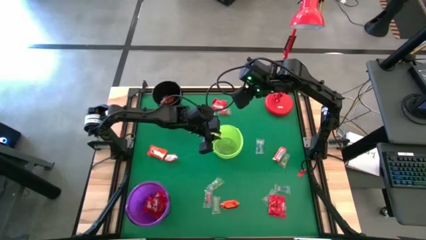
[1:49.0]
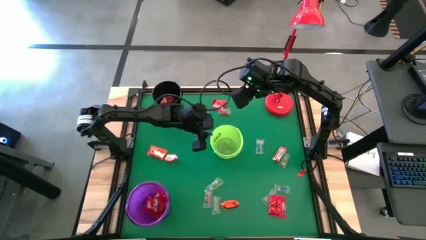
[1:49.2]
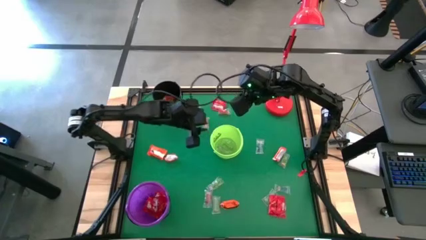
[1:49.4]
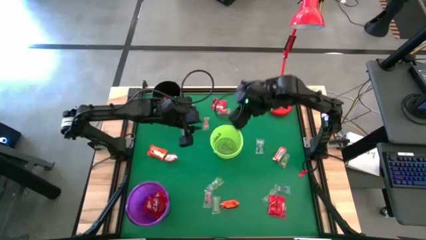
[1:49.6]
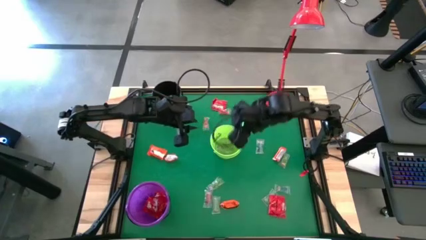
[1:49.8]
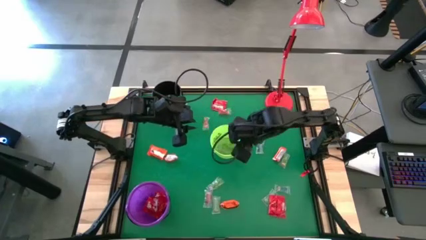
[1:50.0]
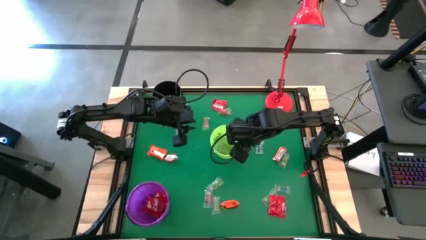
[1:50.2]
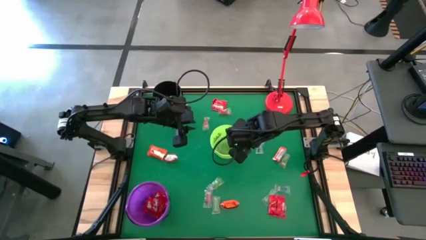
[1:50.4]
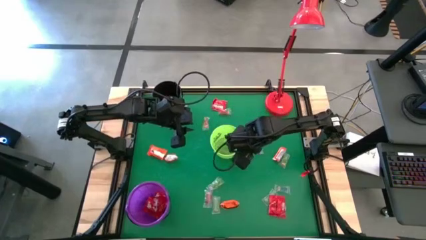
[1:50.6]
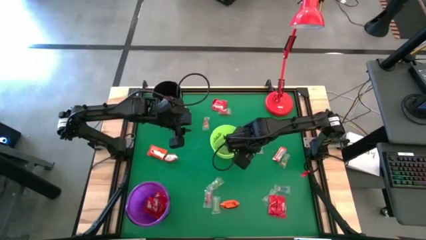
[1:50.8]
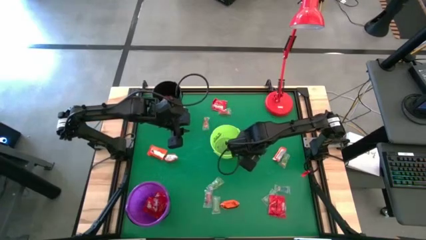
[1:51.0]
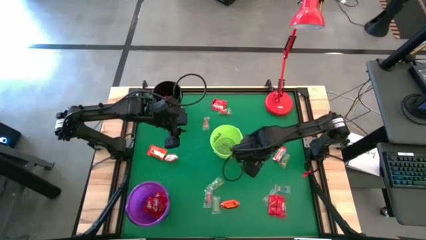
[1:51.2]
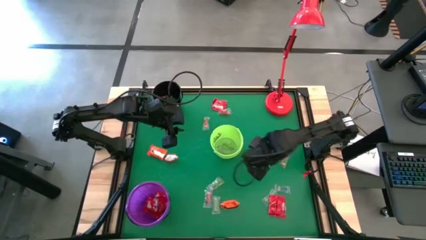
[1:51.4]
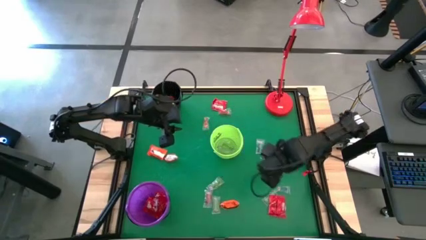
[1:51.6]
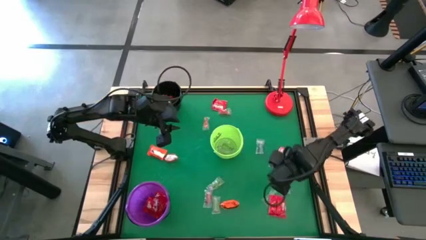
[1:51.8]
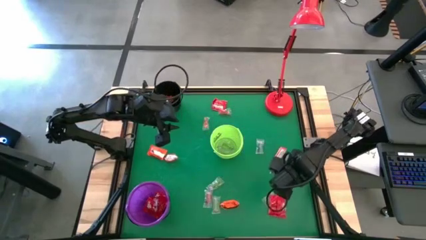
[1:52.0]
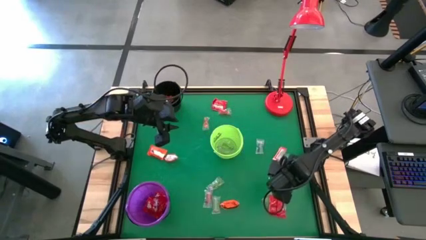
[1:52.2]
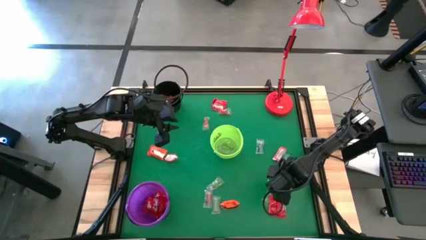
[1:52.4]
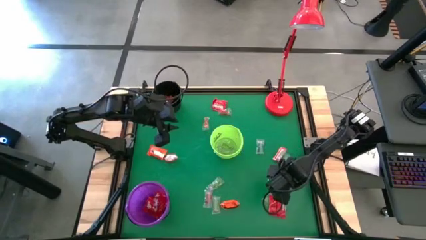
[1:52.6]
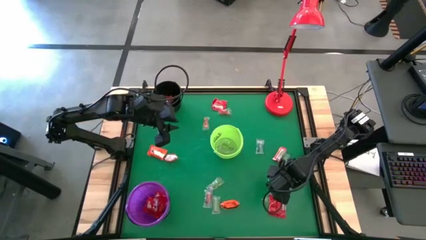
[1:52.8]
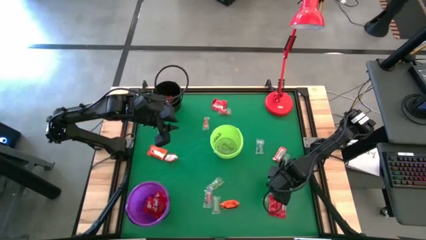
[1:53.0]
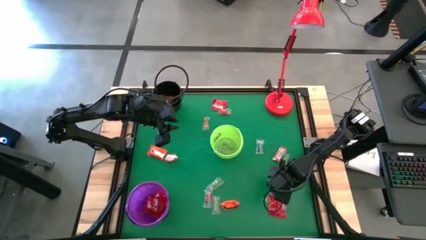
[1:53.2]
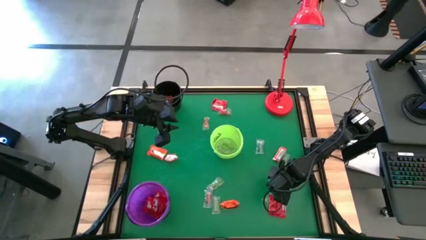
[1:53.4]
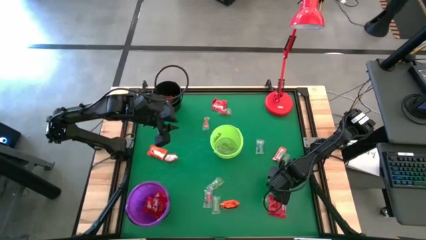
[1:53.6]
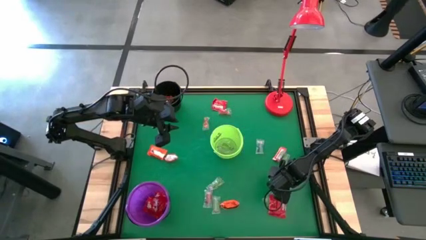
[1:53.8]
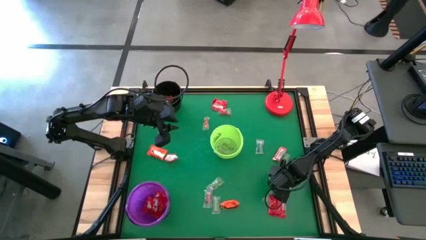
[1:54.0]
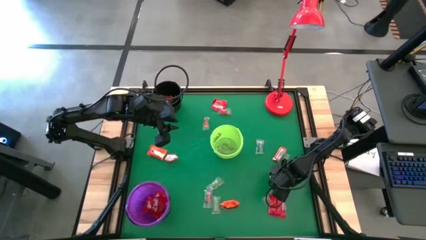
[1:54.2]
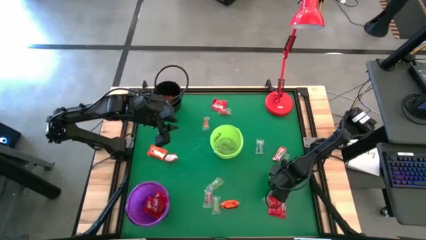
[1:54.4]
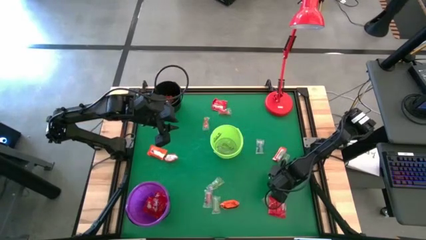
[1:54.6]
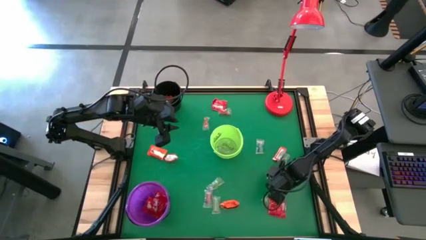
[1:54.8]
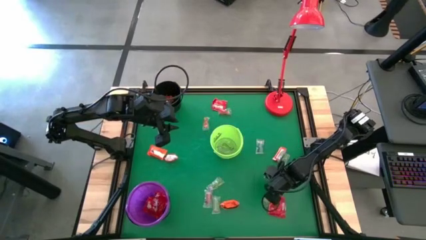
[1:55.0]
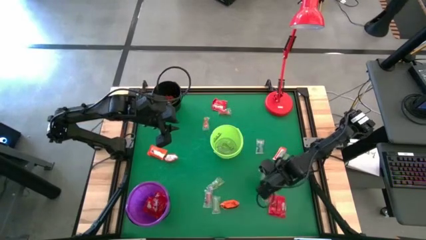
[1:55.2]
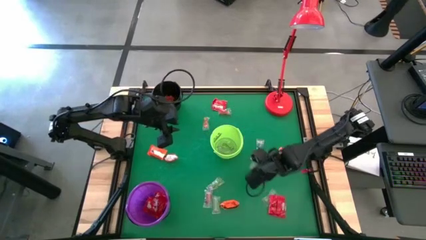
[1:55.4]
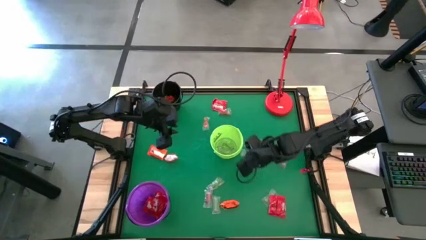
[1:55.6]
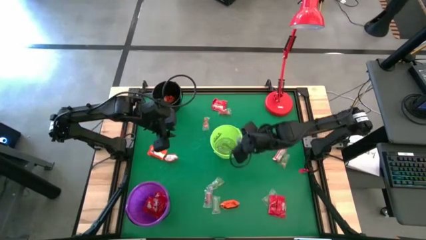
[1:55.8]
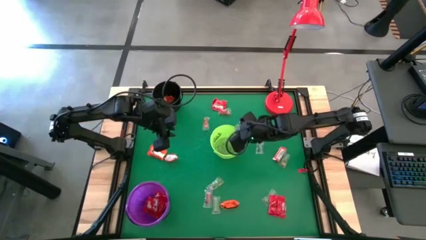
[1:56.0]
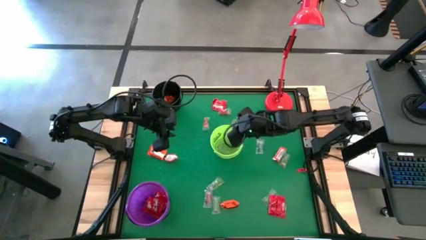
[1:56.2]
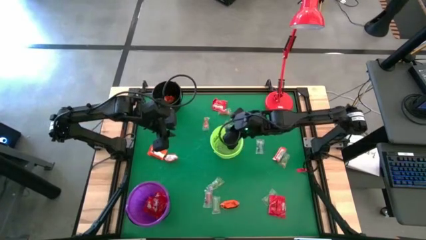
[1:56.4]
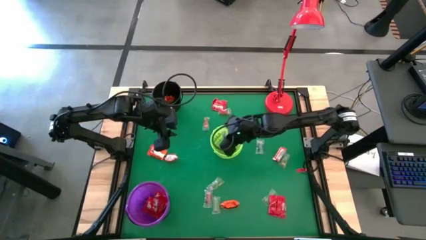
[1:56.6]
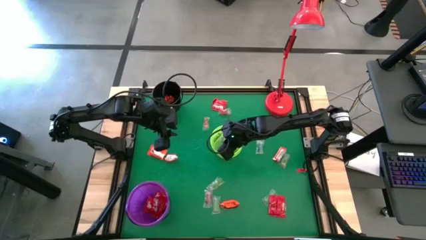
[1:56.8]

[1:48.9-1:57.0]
Task: Sort candy
Put the blue gummy into the green bucket

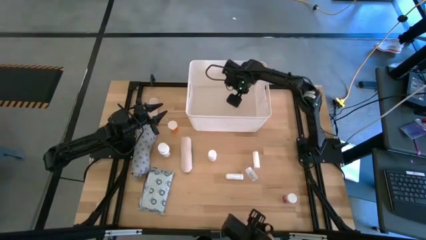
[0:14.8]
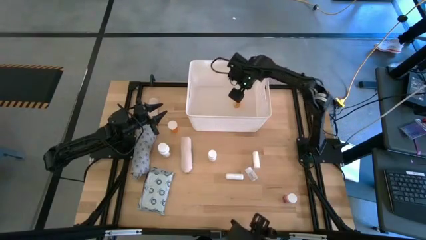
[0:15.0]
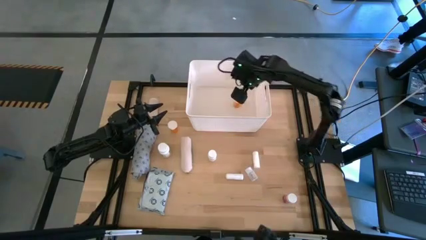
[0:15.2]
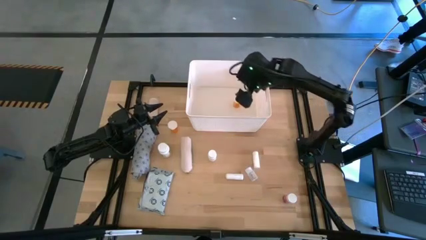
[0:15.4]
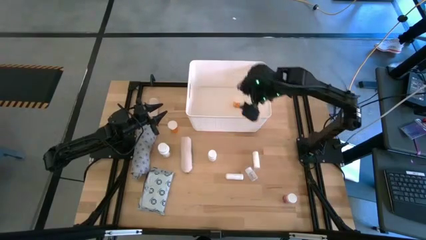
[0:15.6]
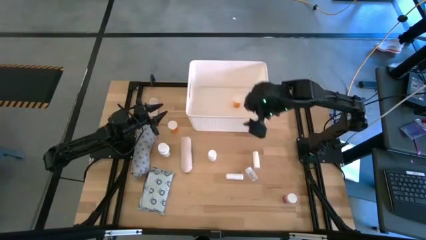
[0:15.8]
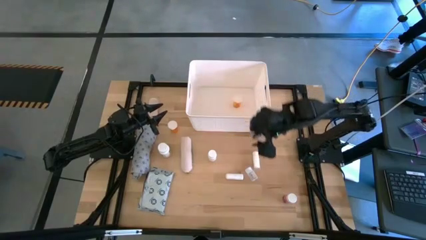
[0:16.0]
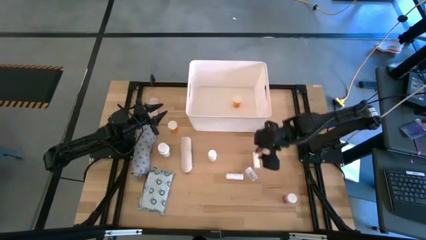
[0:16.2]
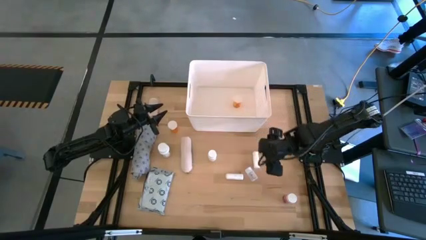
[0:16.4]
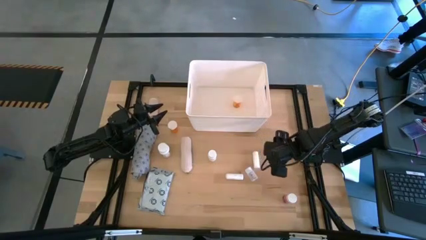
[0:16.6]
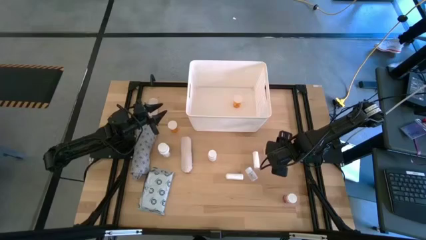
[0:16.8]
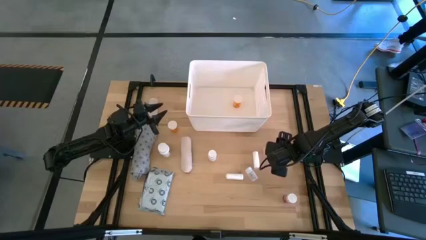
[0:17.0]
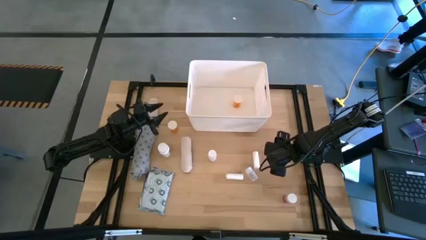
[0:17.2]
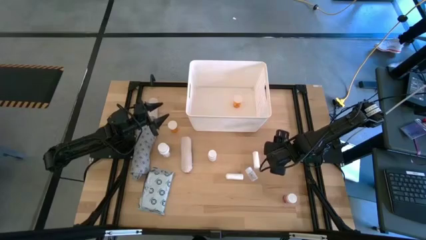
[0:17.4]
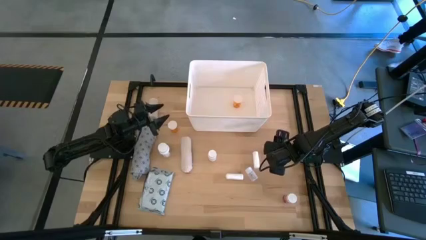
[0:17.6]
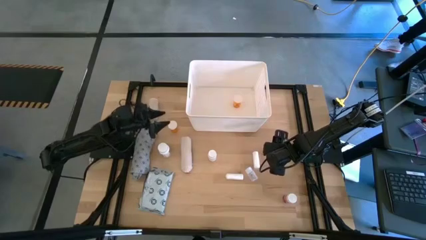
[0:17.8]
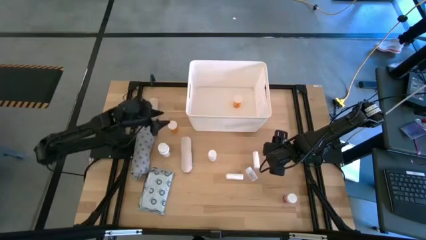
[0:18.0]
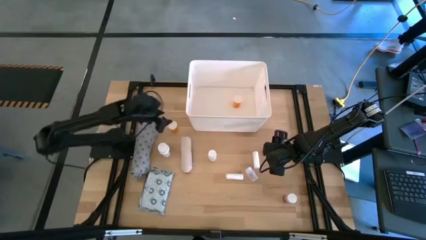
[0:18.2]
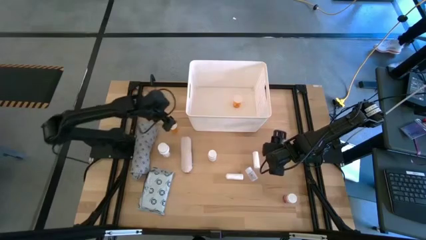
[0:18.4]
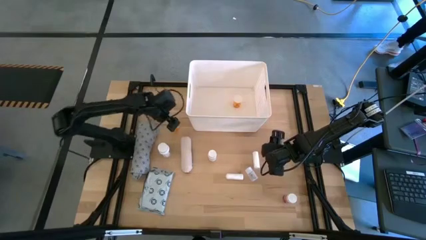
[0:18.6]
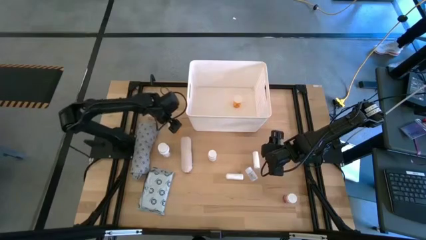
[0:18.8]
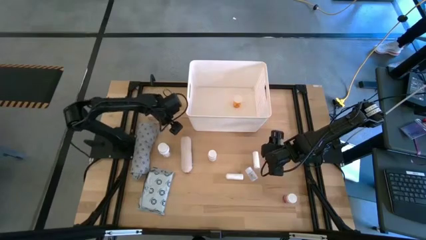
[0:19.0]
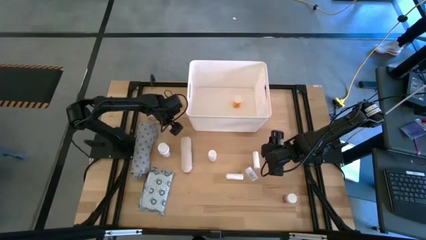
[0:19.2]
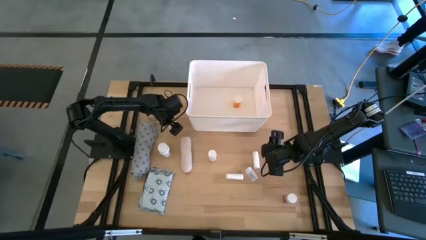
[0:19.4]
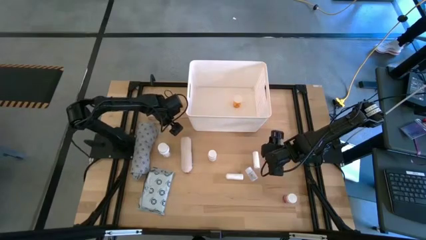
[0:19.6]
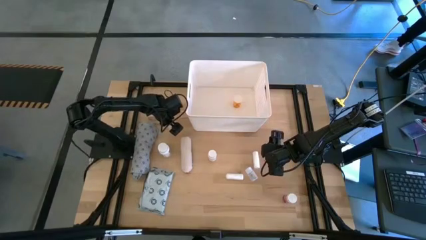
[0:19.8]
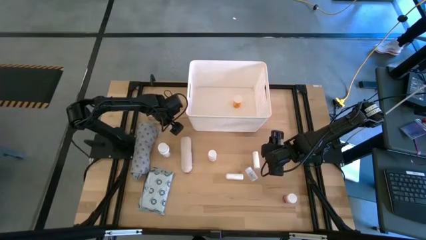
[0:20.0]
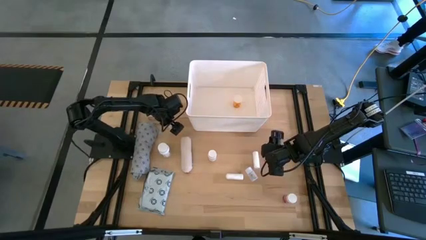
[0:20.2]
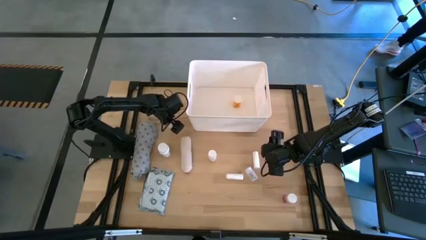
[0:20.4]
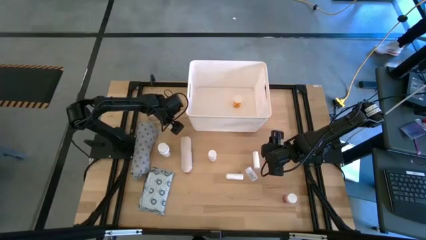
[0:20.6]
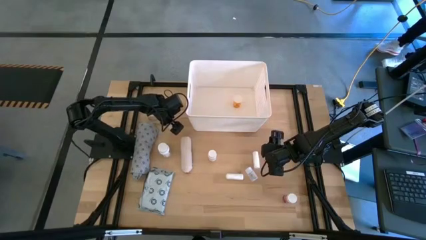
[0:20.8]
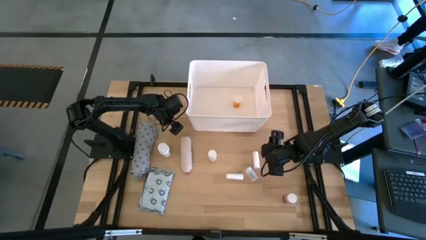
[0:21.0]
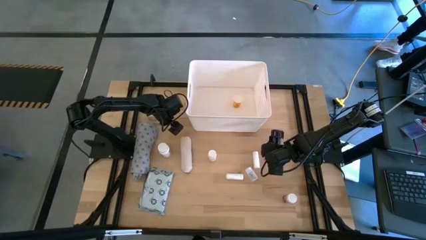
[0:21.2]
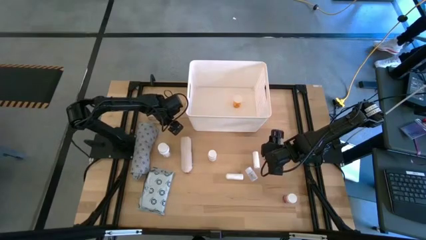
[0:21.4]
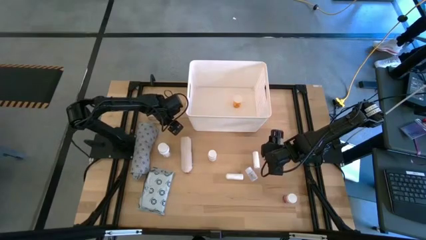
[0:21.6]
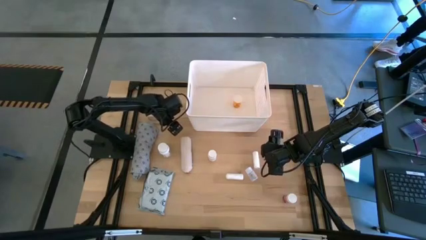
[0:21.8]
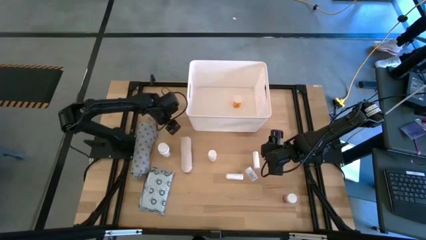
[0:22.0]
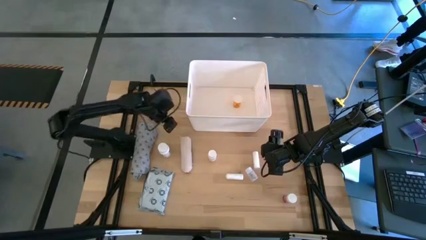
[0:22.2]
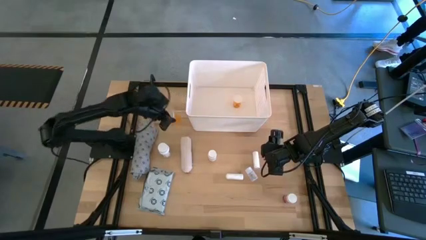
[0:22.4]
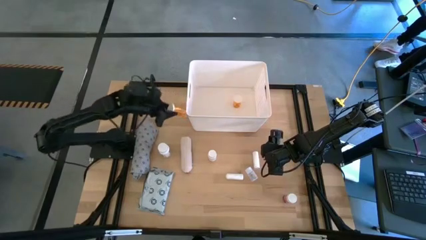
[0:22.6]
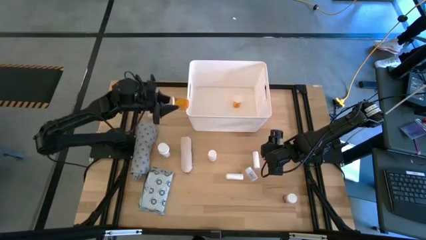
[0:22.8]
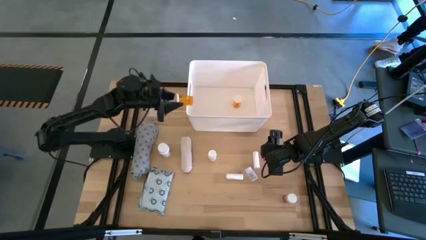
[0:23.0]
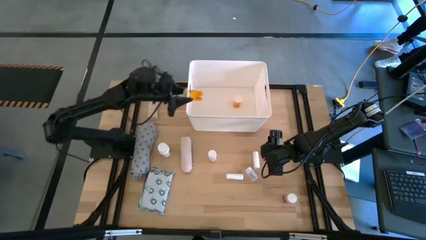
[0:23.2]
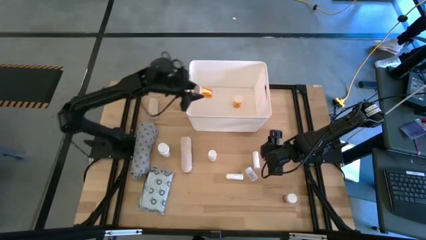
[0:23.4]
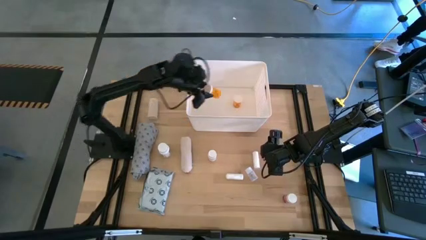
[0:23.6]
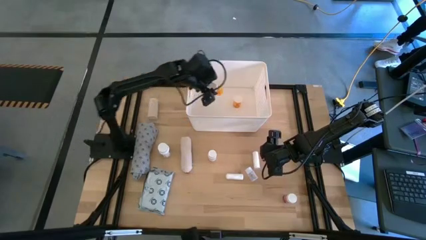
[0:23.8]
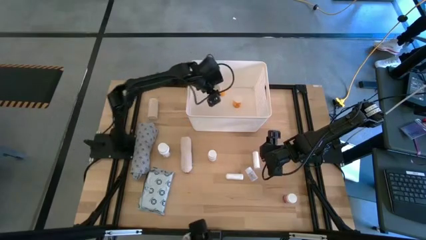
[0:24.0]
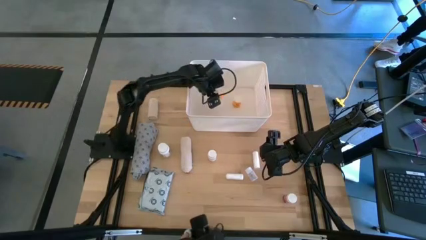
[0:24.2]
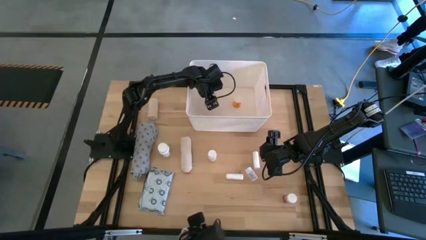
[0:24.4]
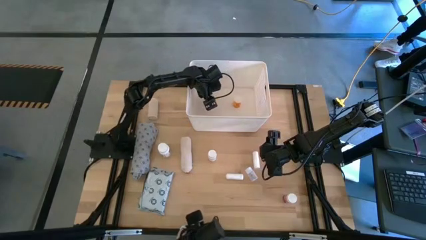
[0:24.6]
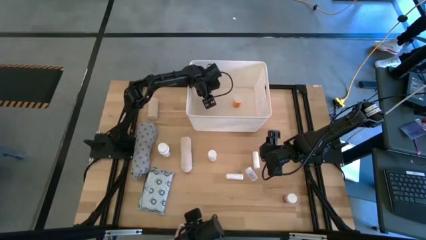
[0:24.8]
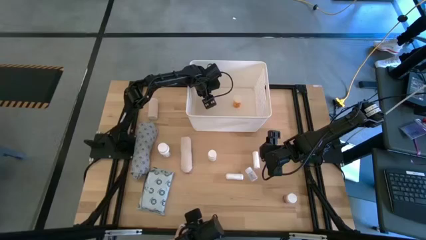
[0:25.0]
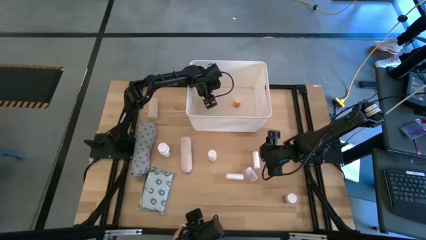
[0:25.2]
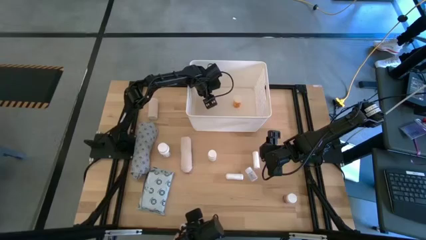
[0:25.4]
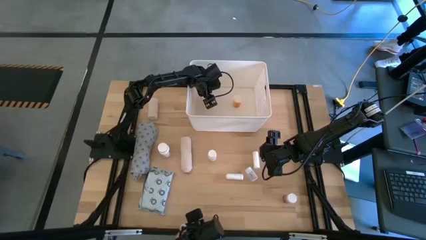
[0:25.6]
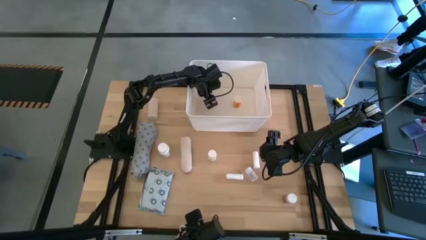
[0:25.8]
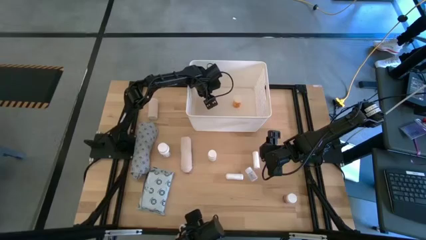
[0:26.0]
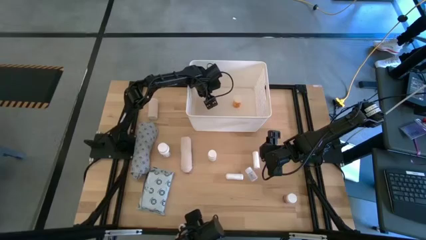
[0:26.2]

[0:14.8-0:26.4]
Task: Pick & place medical supplies in basket/bin
Put the orange pill bottle into the white bin
